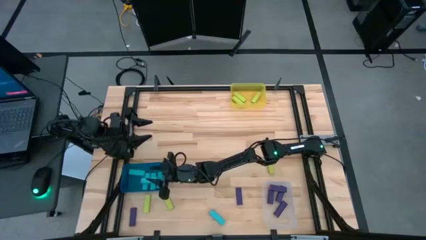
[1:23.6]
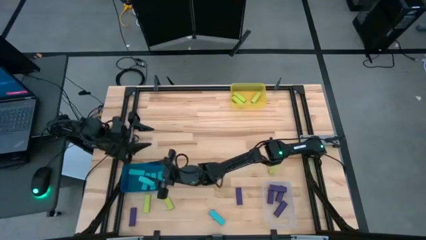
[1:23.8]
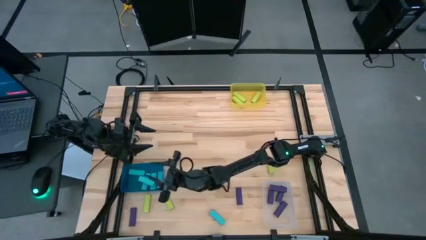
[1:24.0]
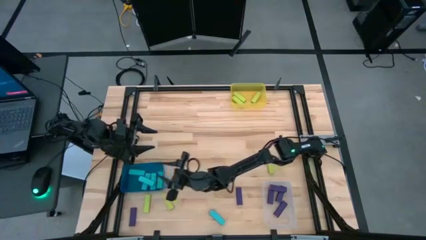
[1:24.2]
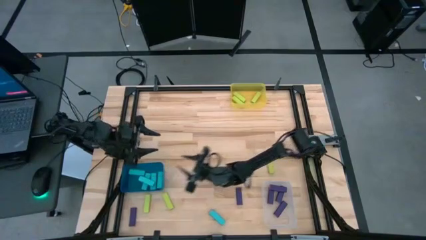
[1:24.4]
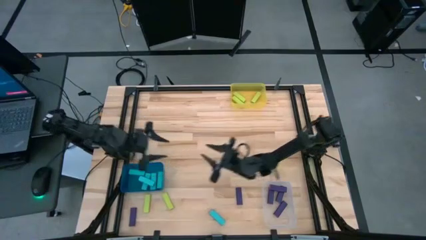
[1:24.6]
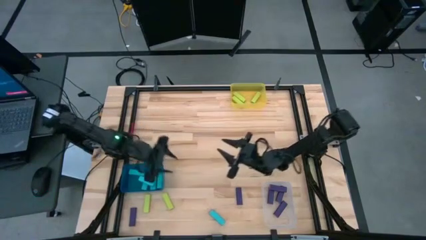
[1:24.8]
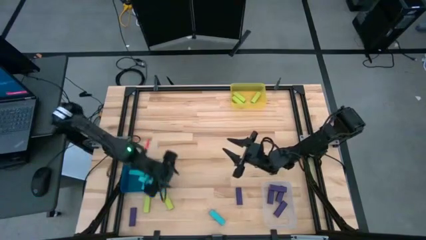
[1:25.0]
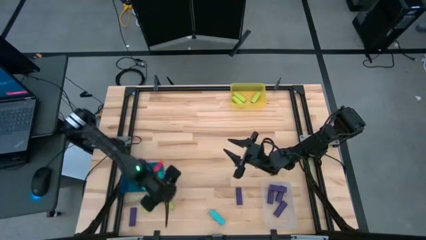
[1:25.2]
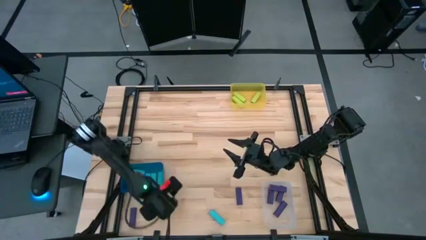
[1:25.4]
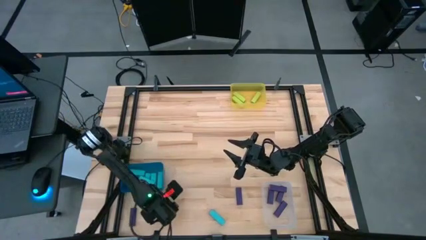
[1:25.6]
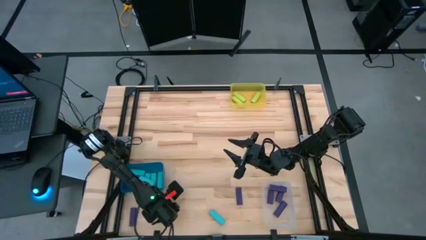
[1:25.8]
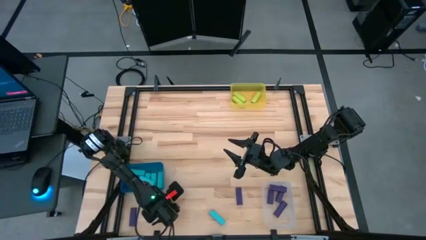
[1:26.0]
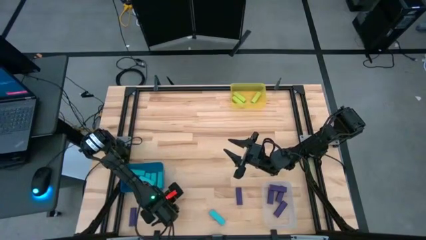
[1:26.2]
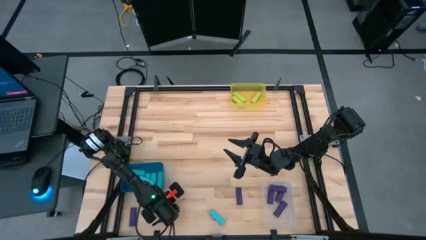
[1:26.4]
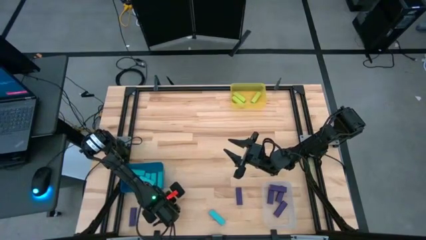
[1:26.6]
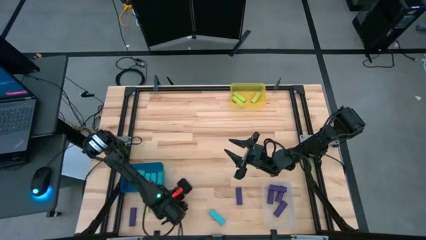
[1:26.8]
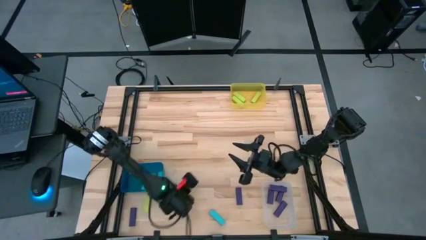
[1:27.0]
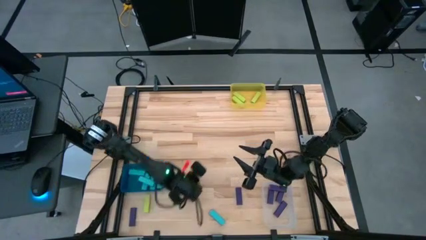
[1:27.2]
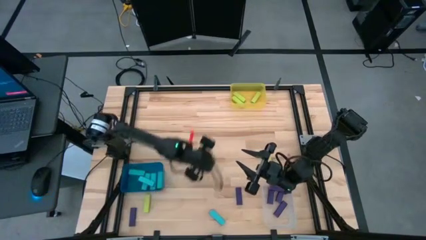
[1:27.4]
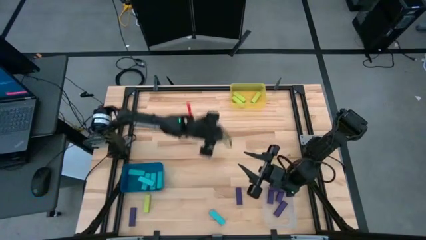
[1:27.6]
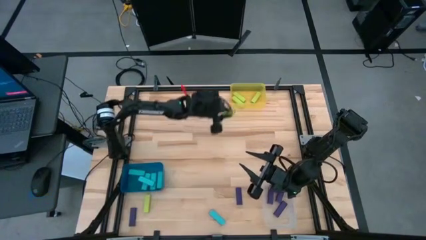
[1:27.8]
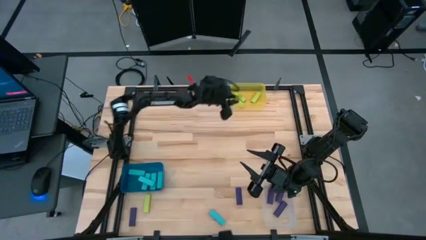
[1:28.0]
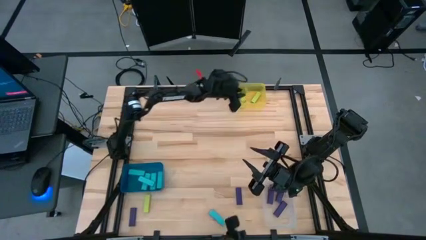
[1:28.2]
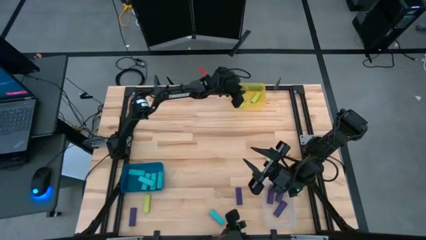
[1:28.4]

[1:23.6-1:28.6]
Task: Sort blocks
Put the bottom right green block into the yellow bin

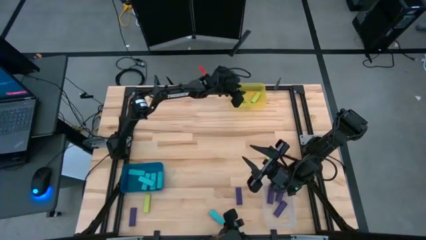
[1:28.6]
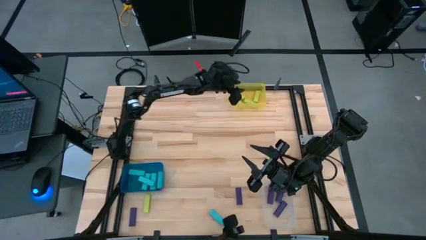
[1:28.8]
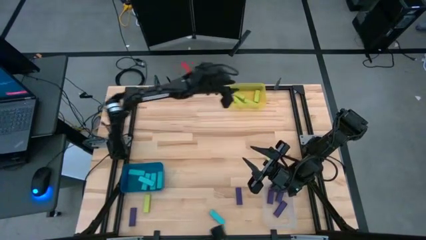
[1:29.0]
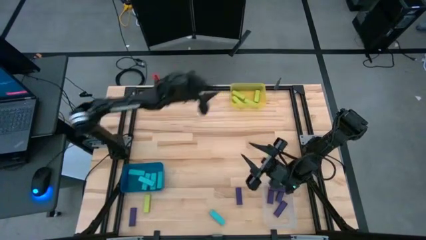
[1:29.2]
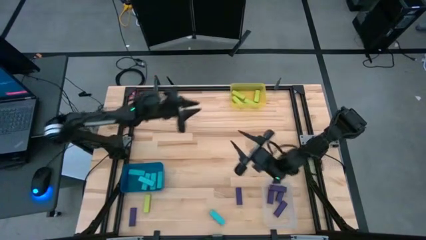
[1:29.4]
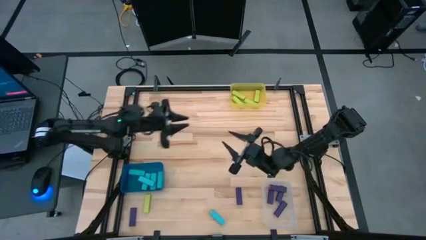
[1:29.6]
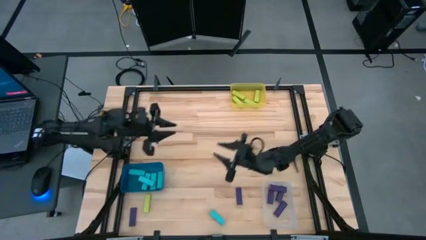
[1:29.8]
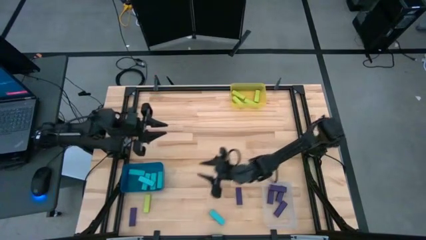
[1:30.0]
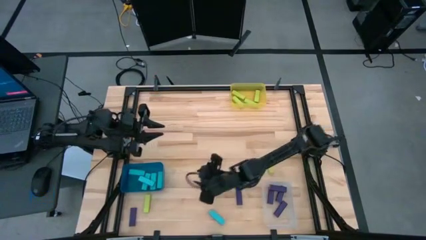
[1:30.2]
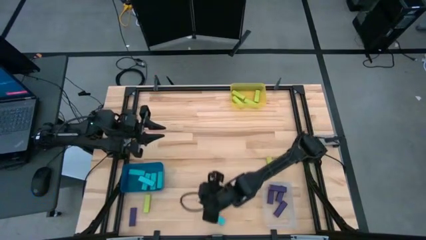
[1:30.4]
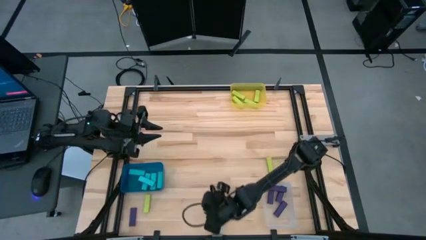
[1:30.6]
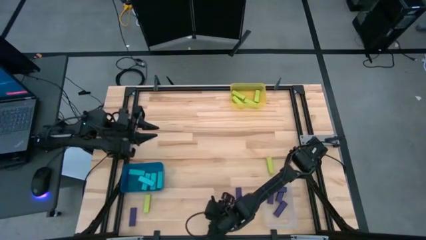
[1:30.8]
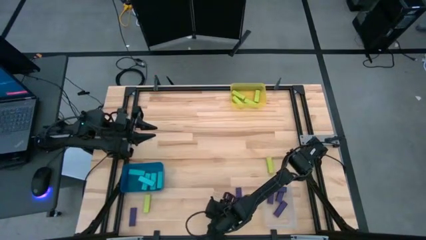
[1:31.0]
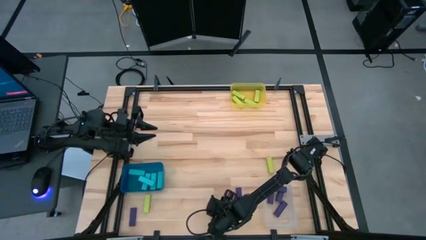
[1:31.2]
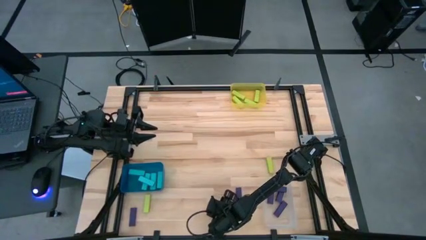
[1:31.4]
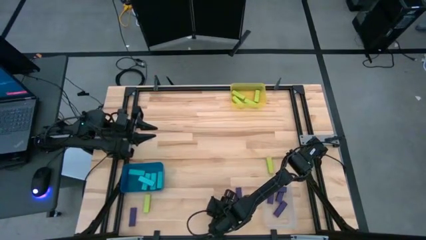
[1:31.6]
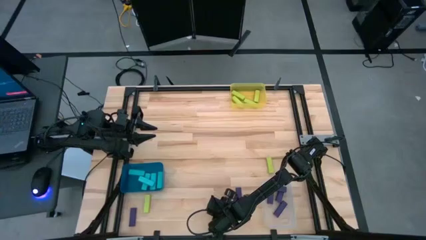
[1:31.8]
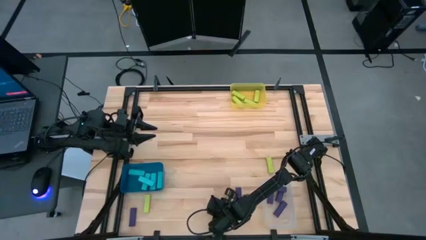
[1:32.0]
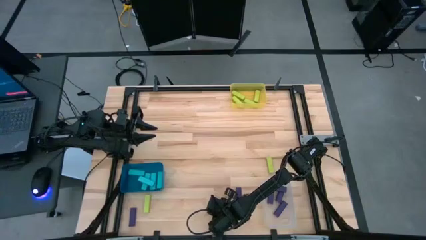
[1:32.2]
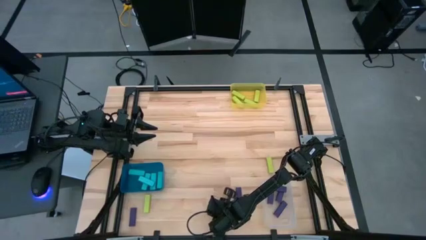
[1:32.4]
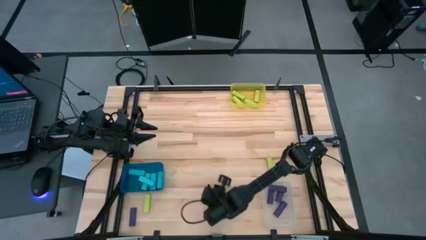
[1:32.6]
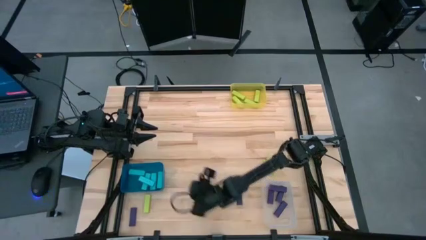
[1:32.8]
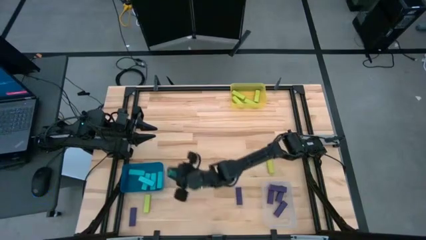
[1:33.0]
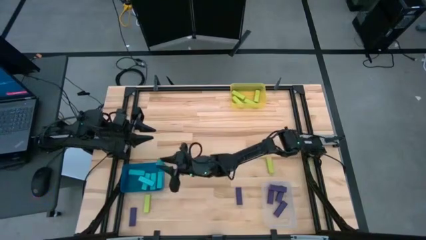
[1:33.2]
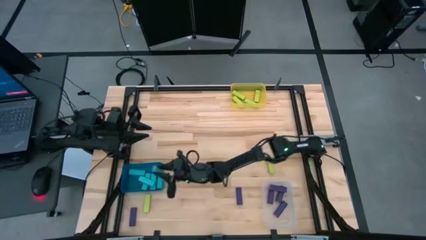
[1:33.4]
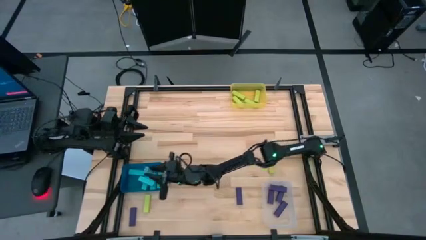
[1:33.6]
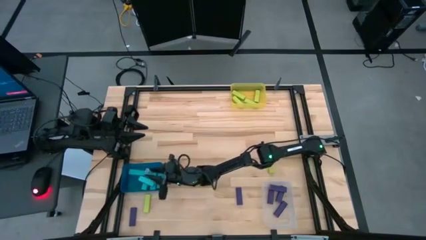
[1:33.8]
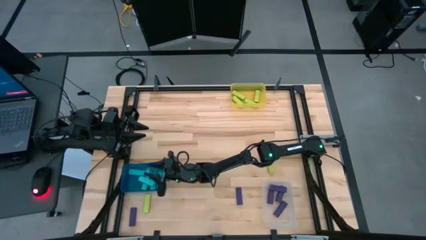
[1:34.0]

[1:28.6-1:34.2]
Put the blue block into the dark blue bin

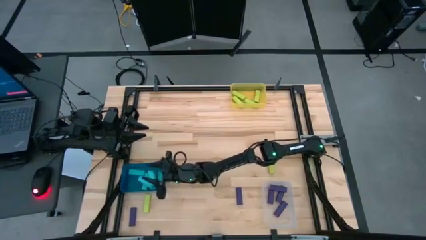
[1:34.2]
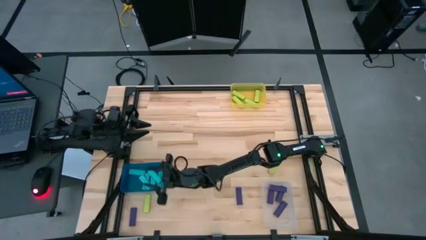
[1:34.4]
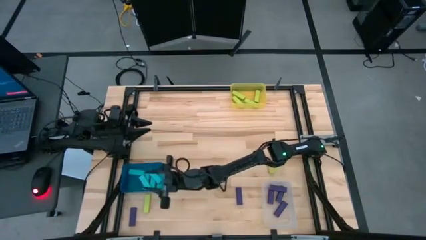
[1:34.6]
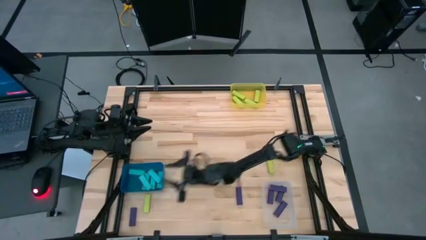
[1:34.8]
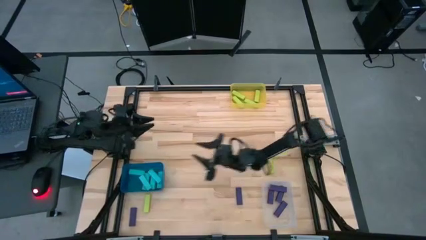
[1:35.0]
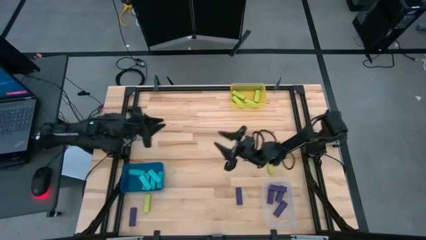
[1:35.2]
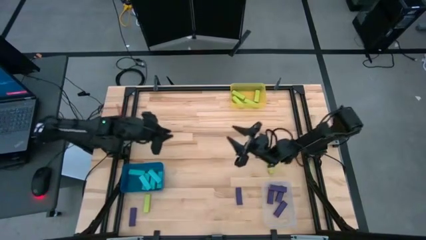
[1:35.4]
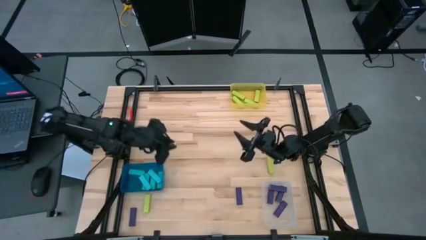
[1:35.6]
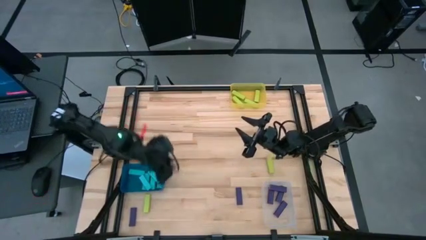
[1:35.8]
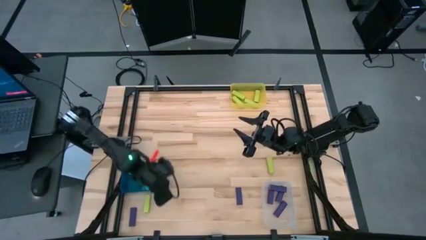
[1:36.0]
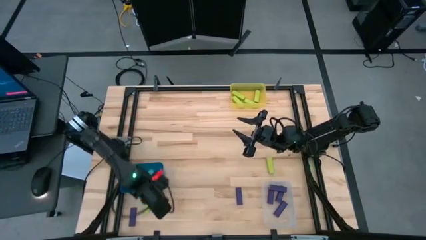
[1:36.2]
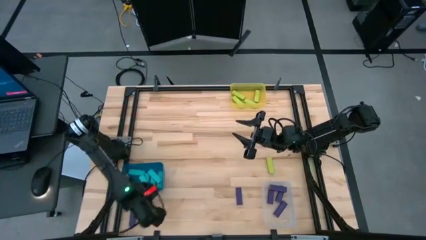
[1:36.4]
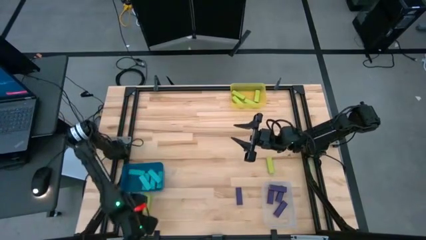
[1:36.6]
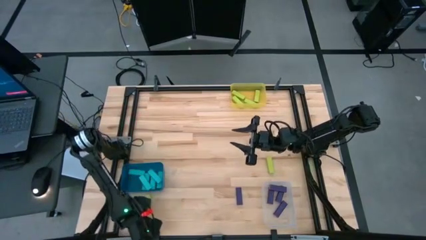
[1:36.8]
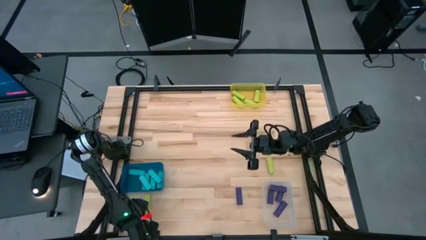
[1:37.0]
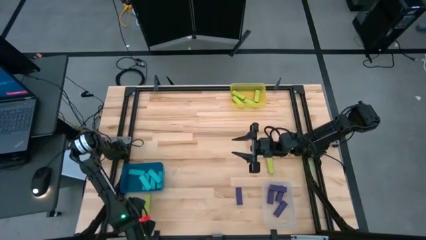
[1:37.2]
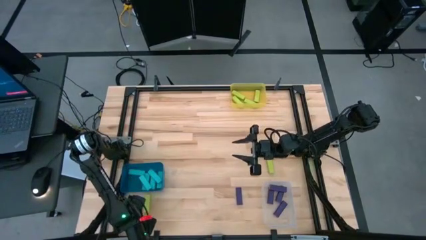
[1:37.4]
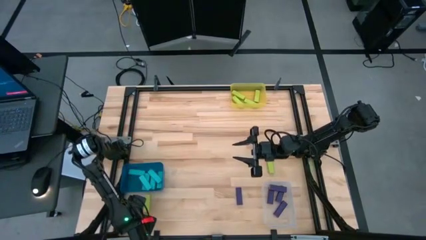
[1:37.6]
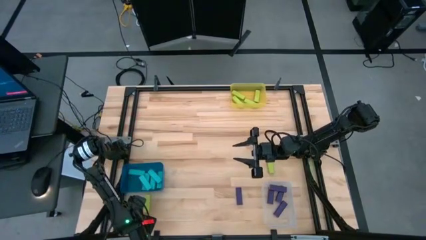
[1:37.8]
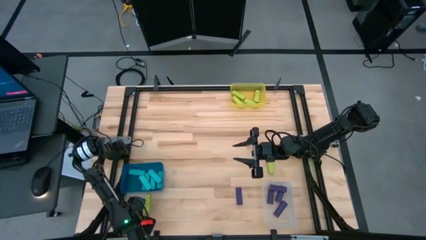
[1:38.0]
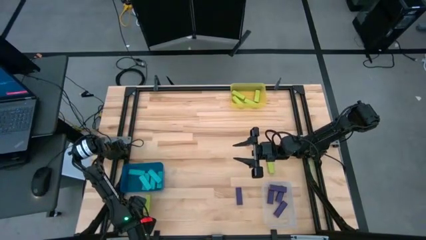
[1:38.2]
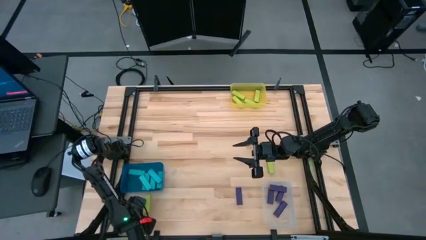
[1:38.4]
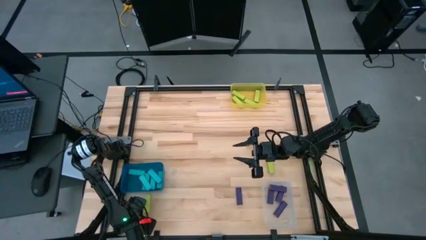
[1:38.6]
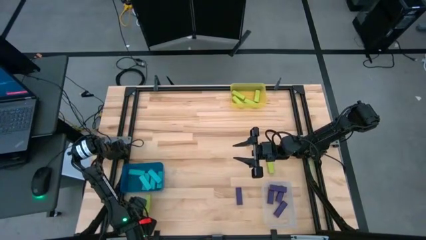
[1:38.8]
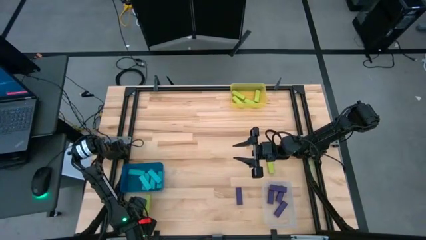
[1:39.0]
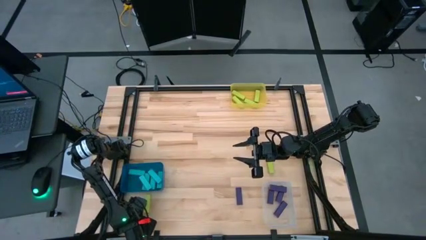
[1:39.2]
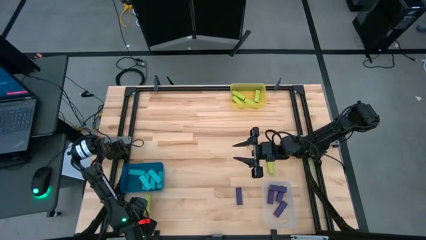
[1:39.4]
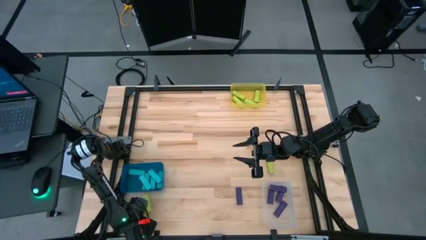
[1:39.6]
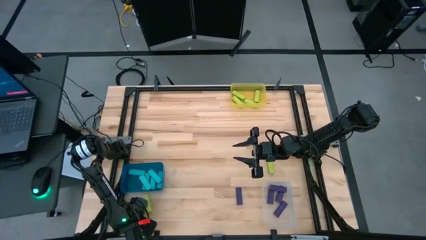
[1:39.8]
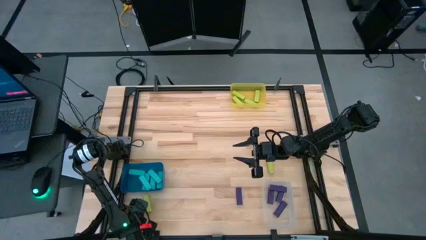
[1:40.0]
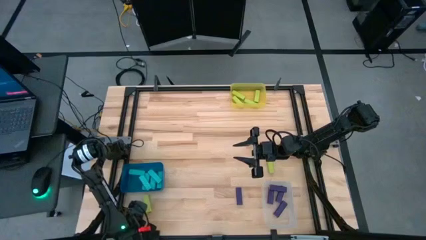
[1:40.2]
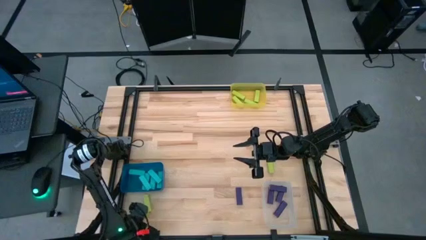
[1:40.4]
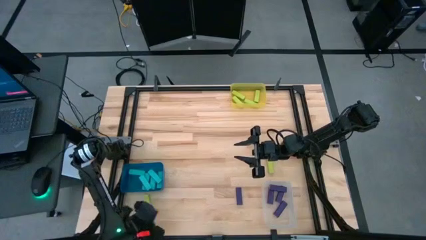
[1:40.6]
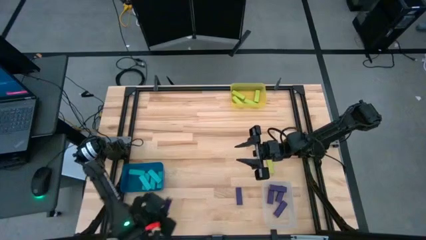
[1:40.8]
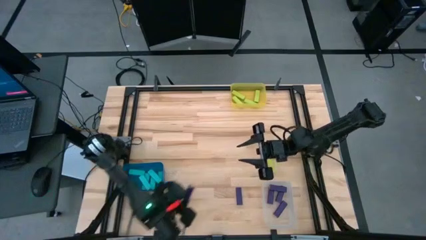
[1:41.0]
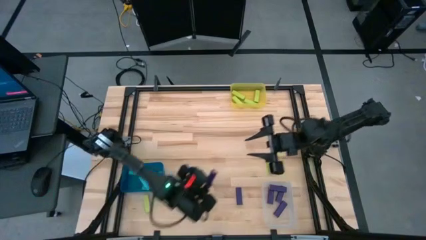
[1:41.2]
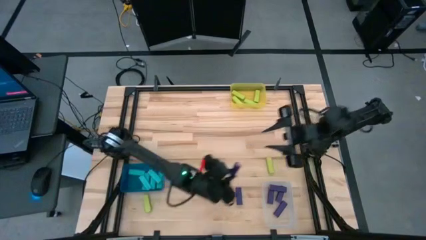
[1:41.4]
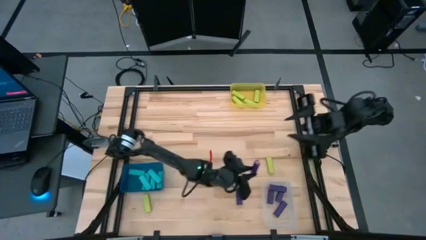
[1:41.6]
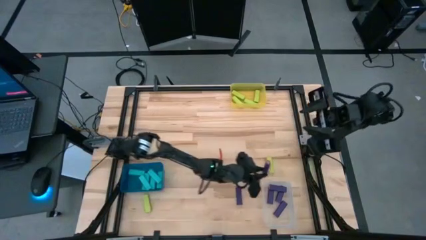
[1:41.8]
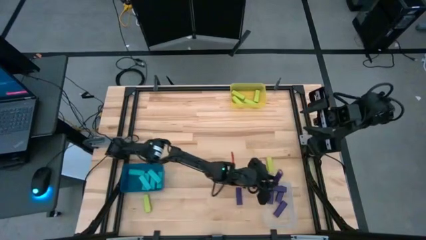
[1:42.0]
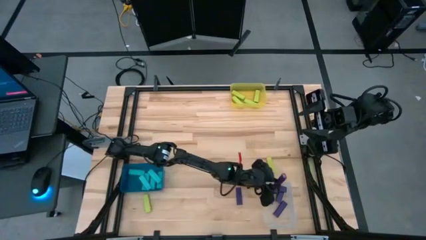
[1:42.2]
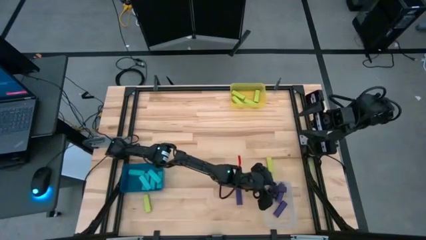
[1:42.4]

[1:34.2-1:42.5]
Put the bottom purple block into the transparent bin
